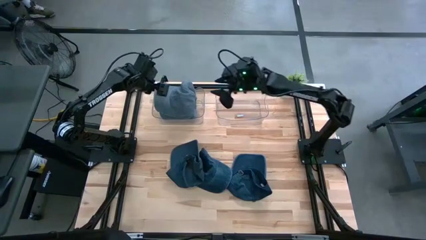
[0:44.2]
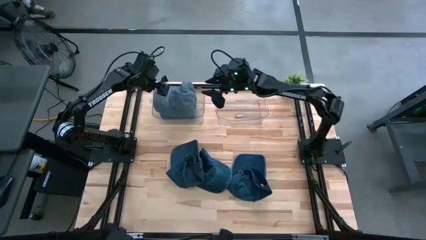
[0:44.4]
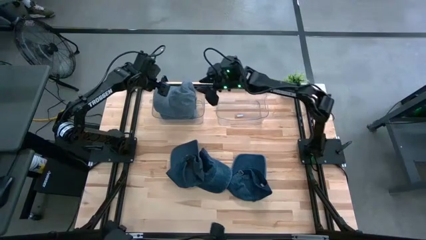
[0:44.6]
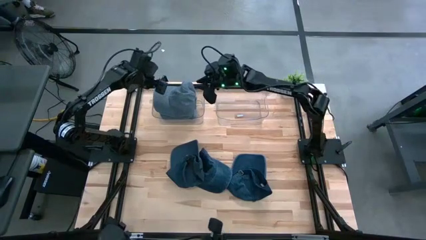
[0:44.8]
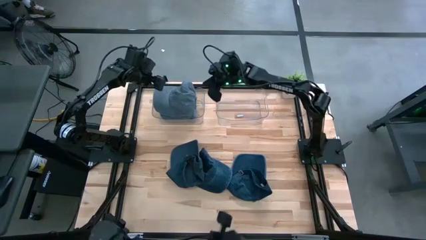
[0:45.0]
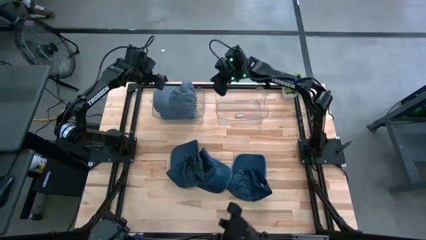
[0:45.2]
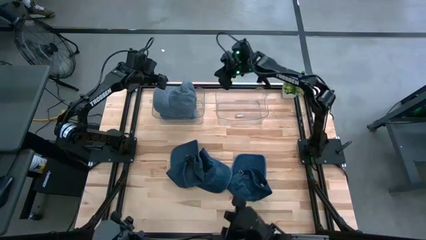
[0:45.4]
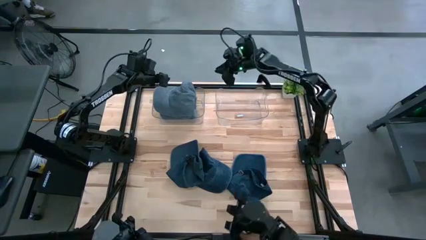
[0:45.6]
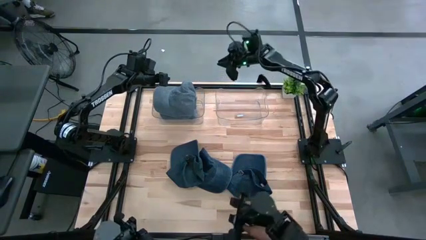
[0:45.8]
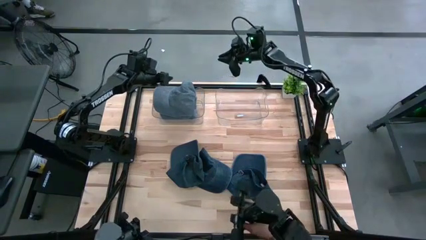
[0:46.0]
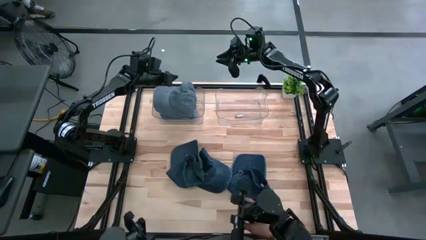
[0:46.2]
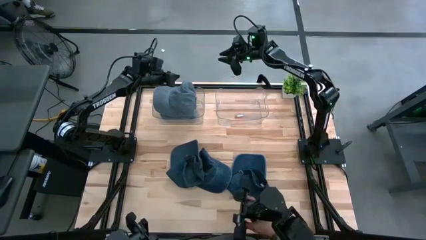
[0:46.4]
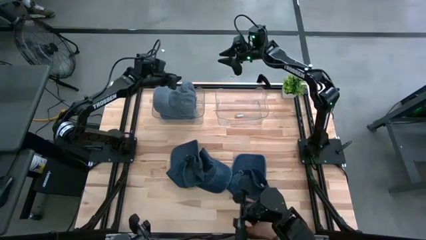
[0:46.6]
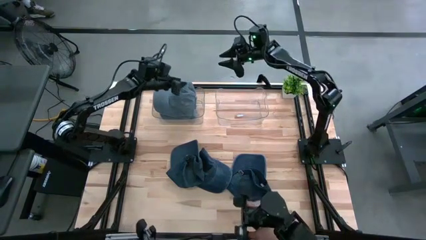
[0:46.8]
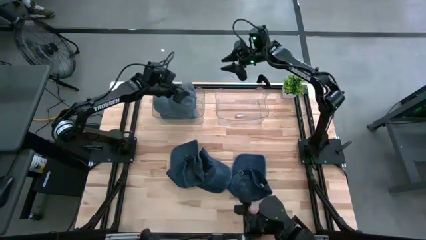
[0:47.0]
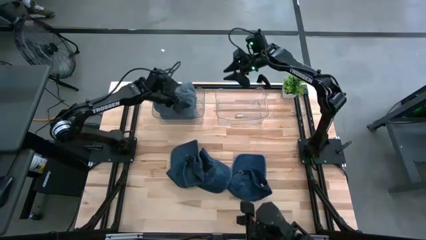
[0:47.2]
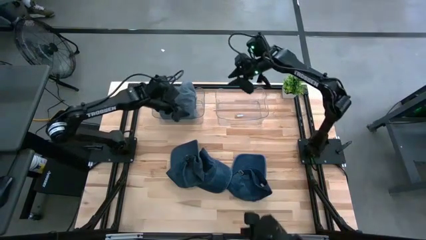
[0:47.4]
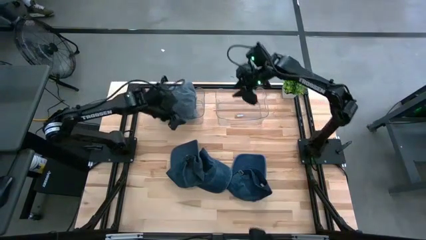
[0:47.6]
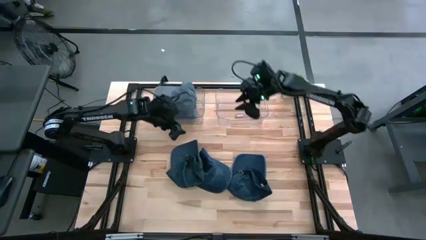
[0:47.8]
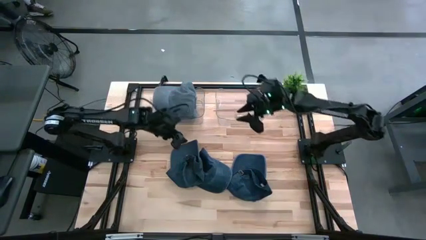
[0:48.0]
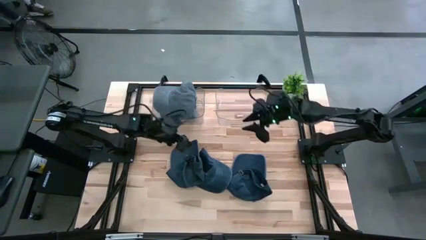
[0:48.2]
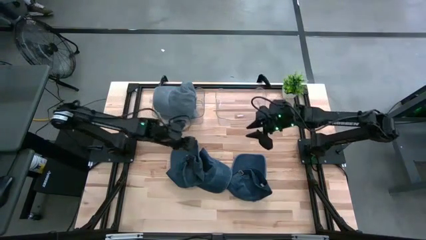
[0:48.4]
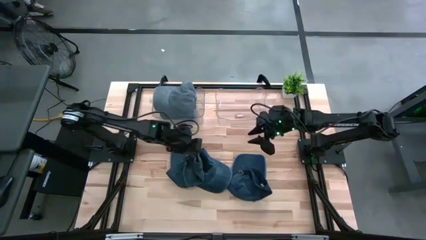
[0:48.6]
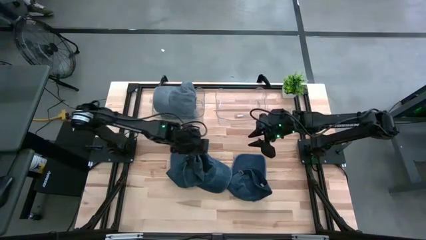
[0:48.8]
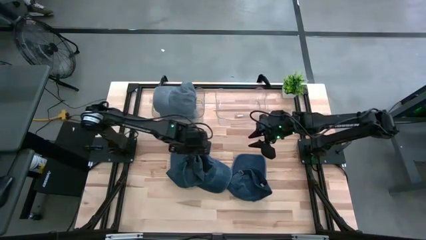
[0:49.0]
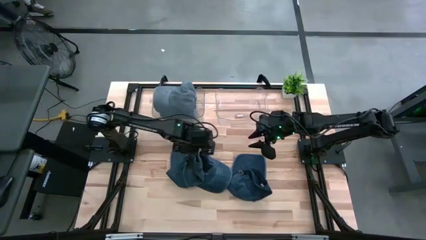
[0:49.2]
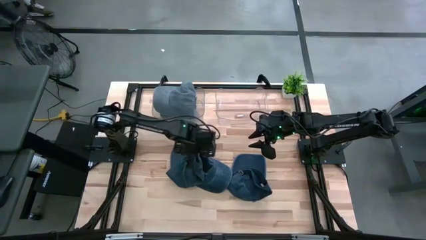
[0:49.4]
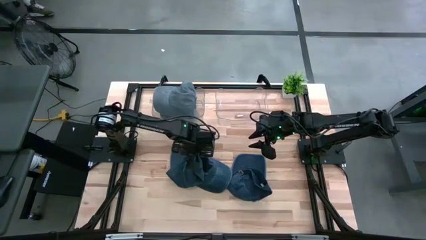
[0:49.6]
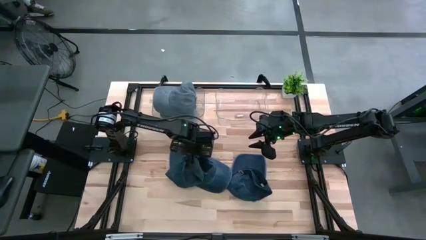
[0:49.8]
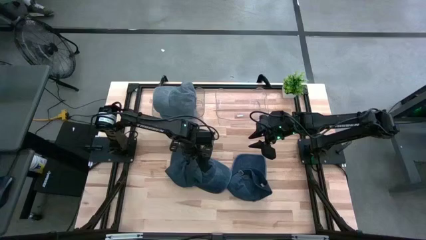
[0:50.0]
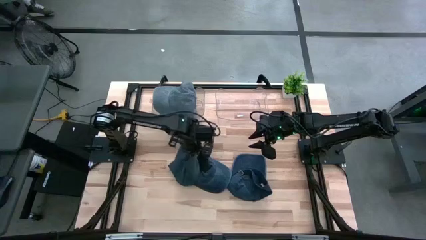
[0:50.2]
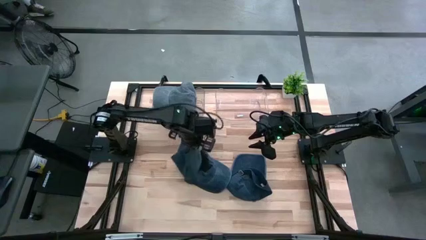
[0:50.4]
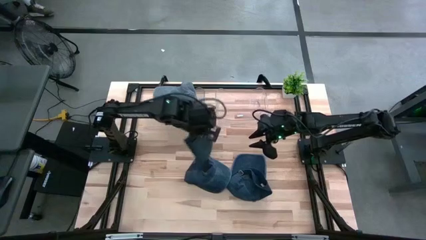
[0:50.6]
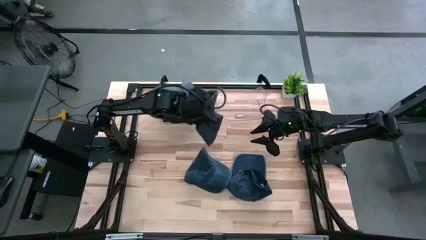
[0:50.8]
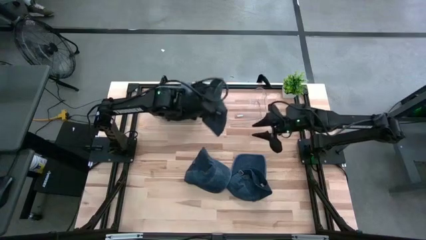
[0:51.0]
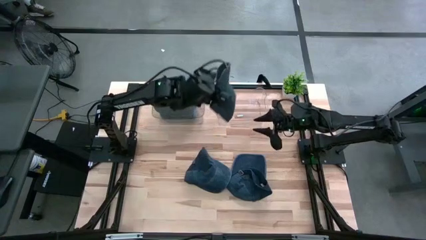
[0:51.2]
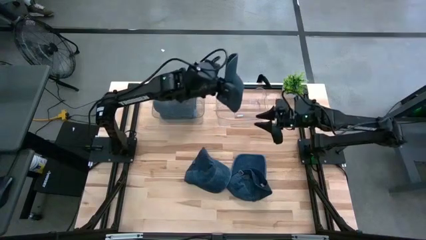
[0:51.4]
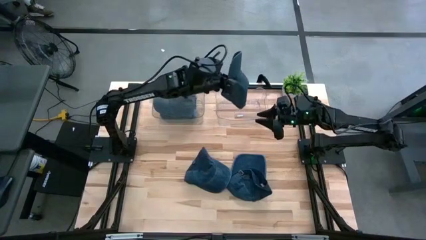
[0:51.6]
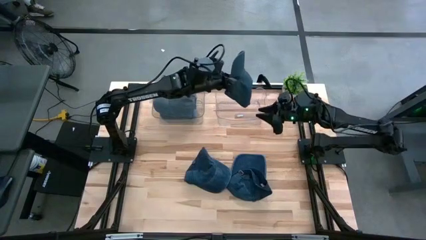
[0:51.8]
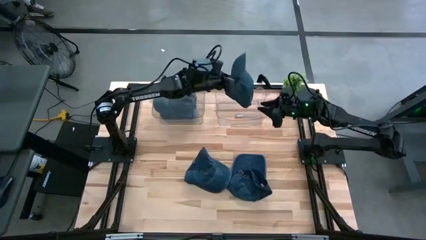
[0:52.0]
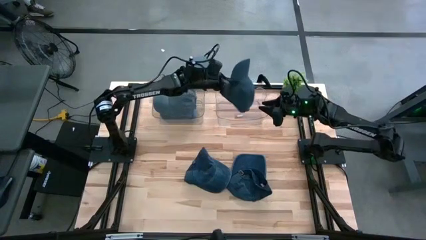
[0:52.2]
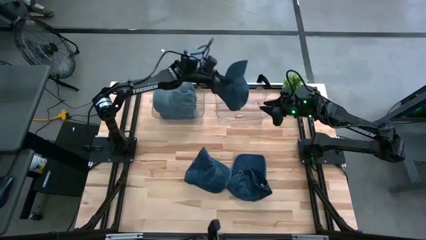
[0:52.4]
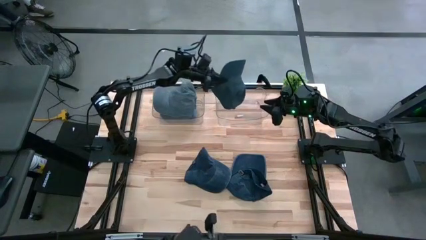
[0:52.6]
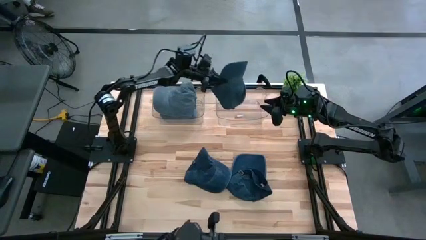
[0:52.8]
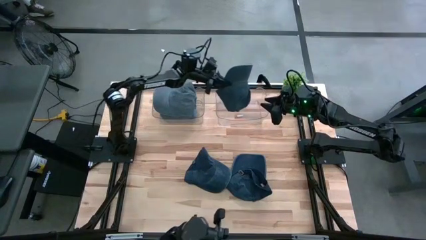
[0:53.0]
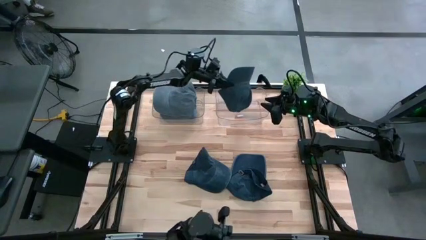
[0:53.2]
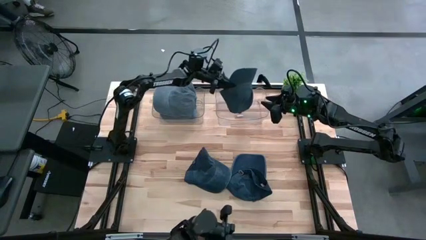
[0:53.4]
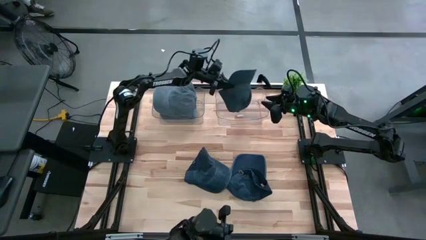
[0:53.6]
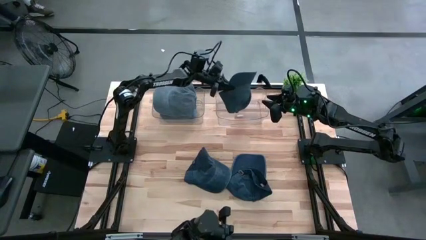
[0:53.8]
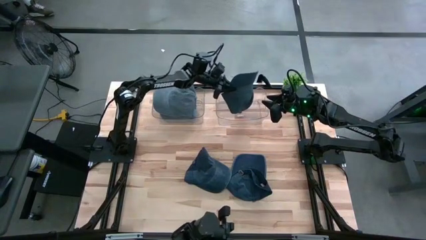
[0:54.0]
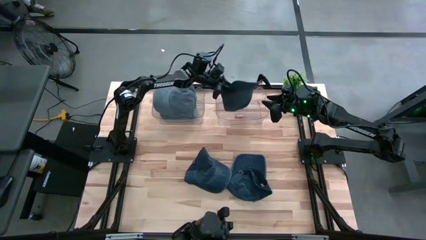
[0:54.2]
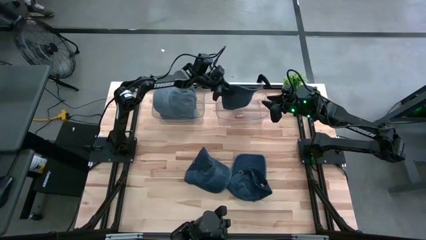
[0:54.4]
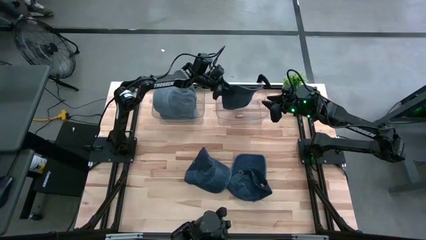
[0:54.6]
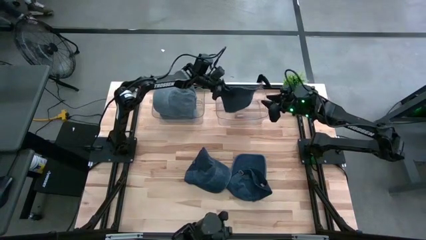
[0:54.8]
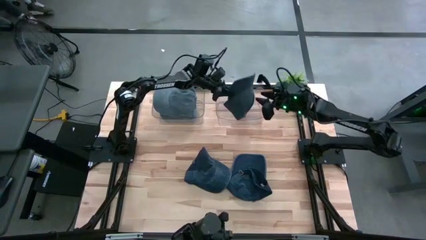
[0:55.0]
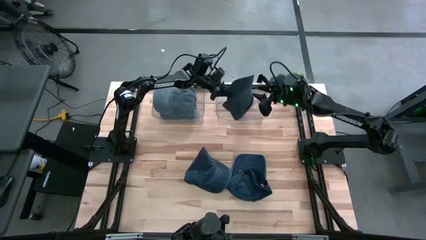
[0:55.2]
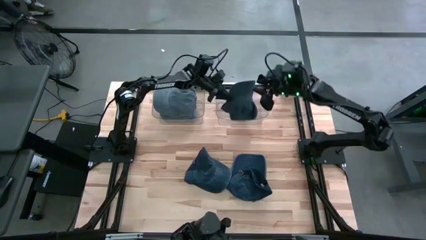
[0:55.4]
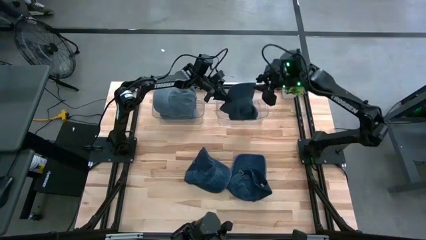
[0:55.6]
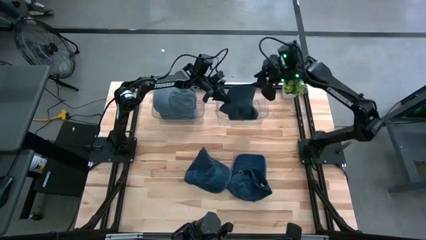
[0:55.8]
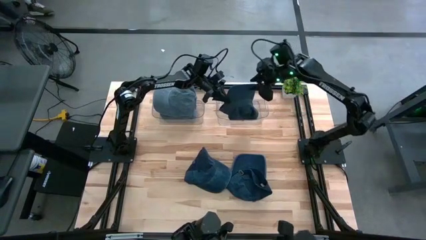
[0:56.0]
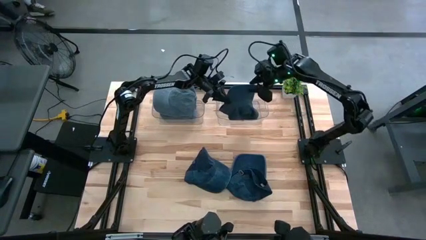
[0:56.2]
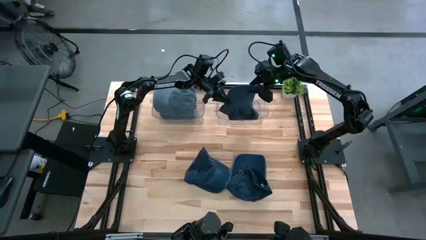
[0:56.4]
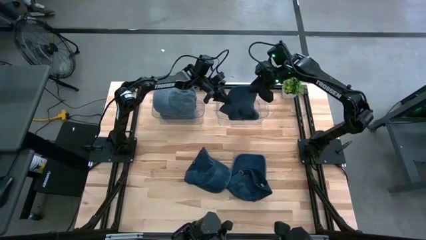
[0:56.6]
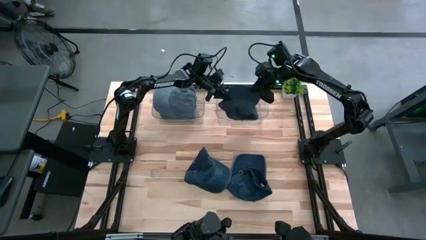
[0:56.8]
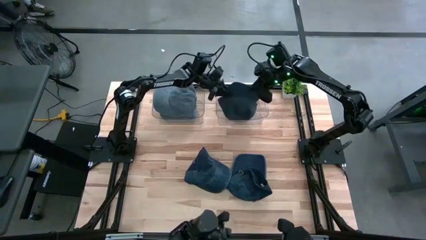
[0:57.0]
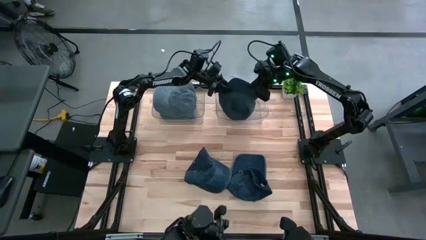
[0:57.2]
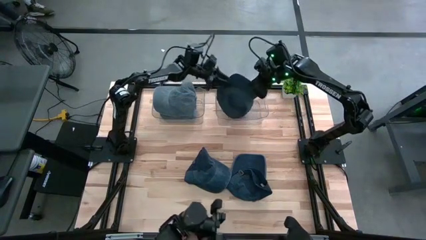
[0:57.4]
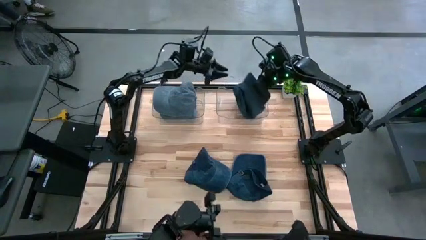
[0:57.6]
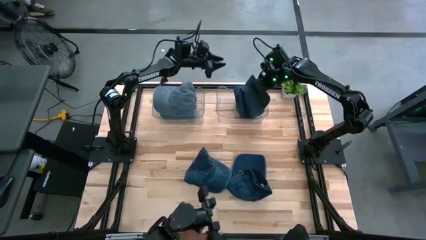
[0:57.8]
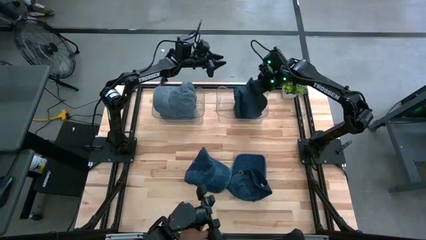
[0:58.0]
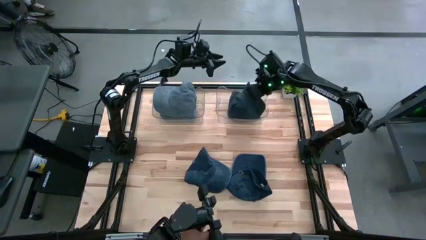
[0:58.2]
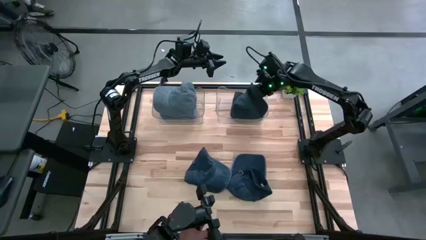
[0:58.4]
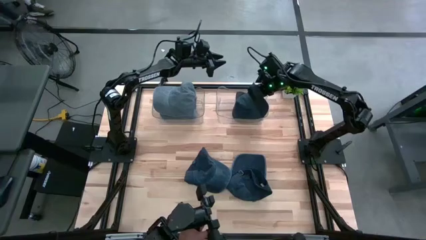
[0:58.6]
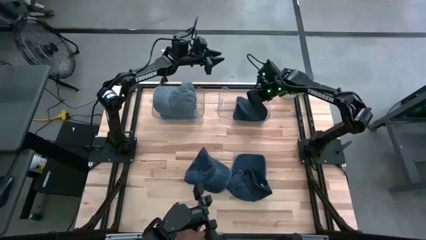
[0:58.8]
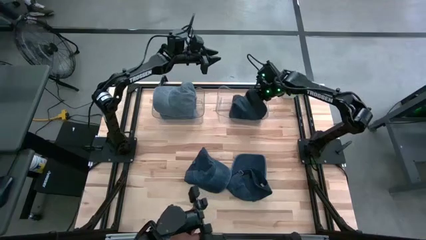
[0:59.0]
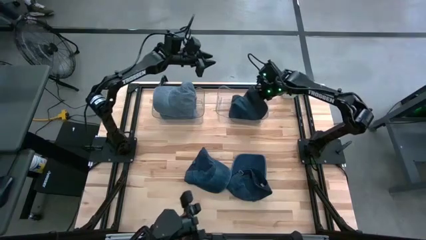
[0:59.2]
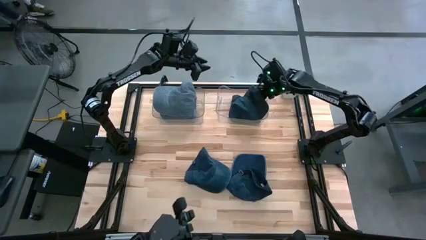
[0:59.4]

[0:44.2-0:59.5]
Task: Pick & Place hat
Put the left blue cap into the right transparent bin

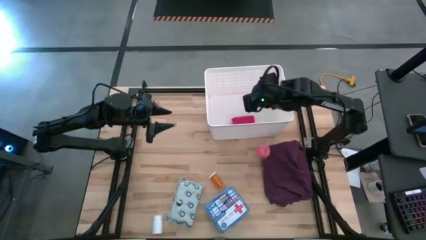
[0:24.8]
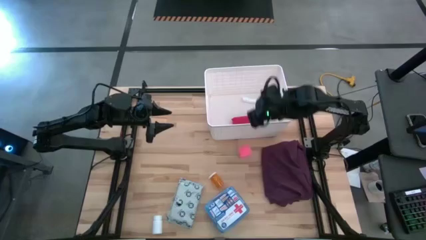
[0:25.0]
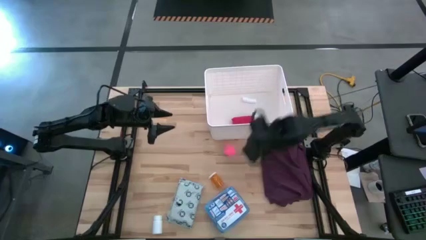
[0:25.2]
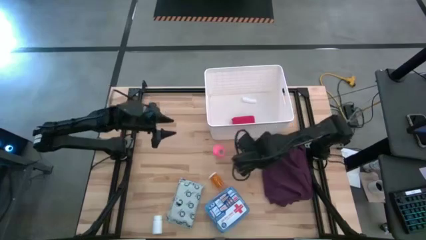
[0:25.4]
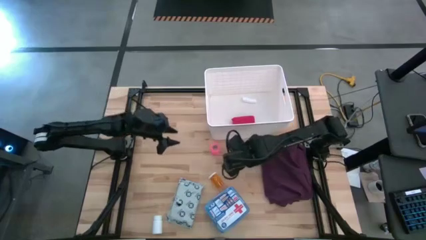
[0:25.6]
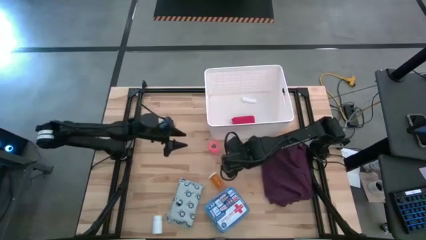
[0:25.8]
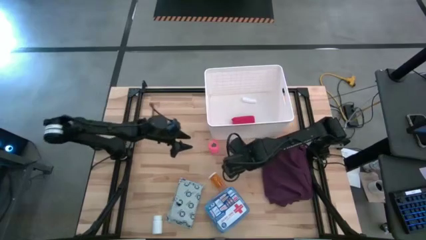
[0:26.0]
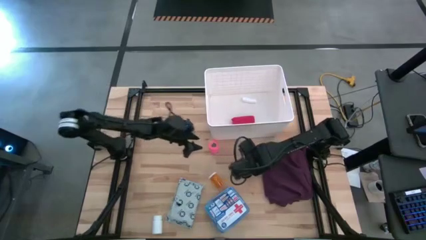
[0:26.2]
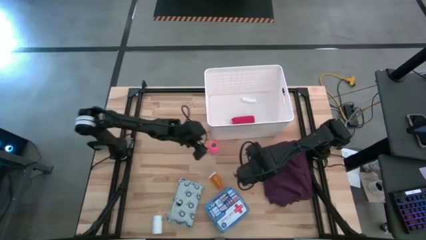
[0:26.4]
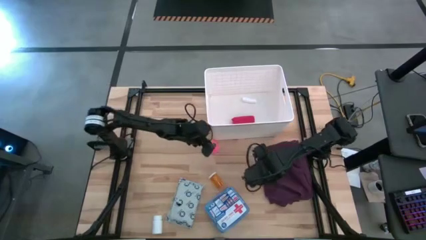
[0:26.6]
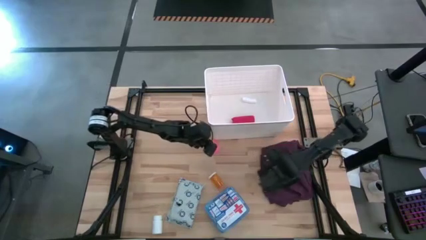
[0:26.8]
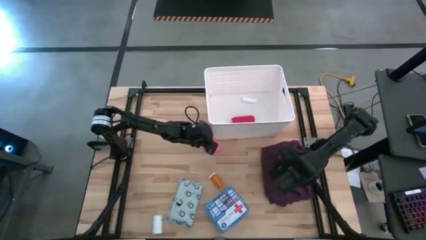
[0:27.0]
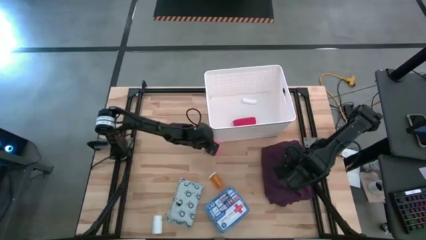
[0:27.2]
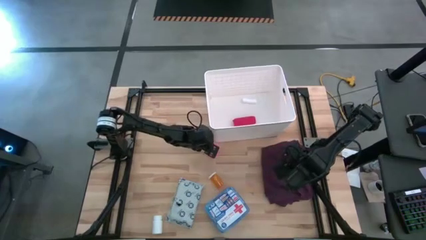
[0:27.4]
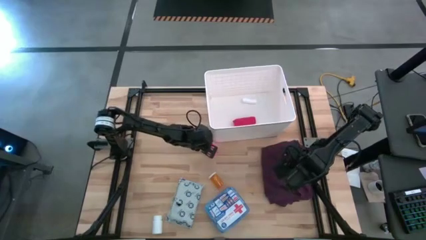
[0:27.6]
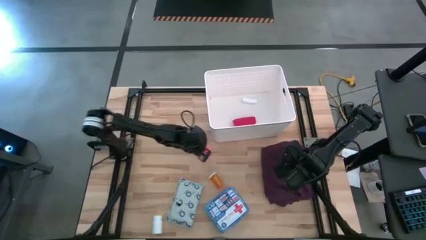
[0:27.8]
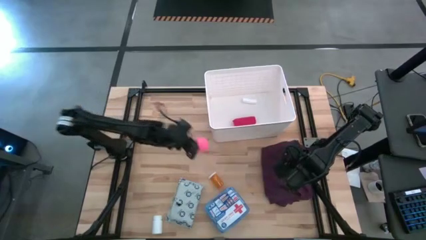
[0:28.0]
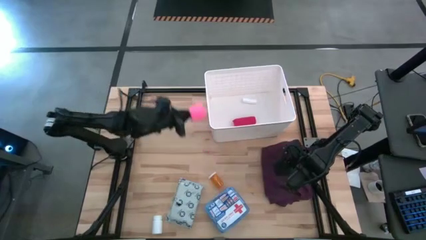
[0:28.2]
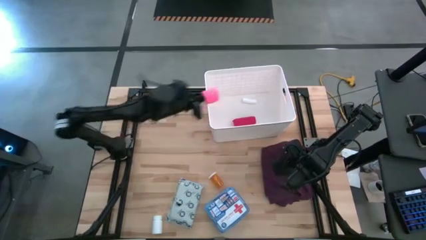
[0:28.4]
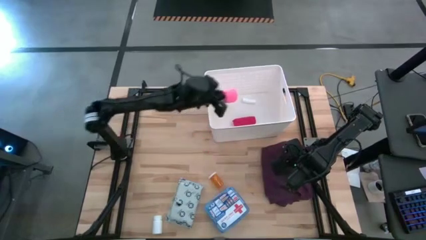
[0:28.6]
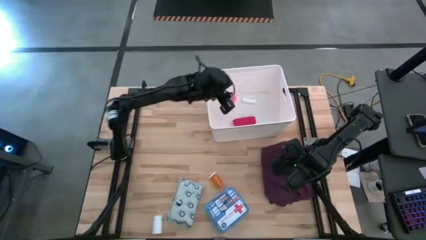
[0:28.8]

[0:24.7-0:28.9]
Task: Pick & place medical supplies in basket/bin
Put the pink bandage into the white bin
